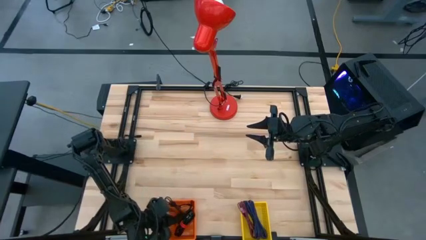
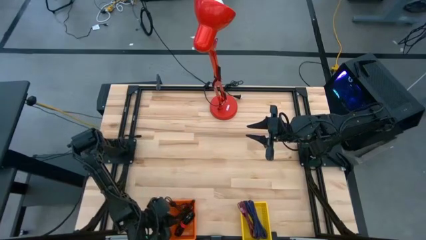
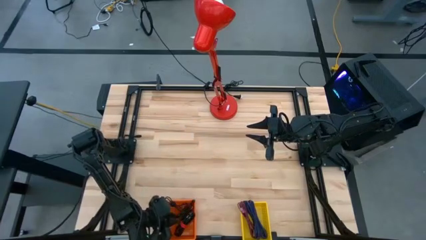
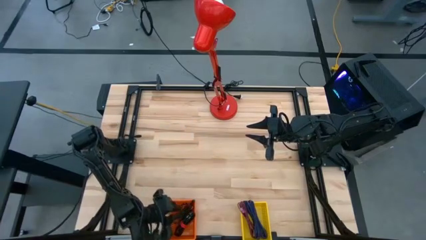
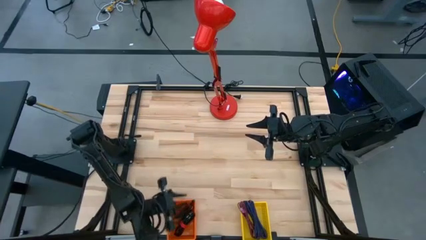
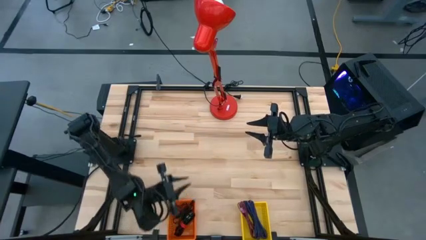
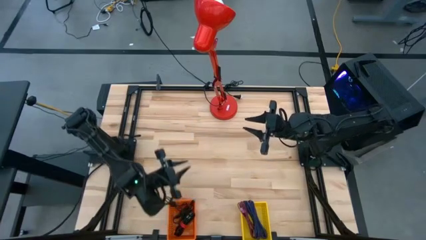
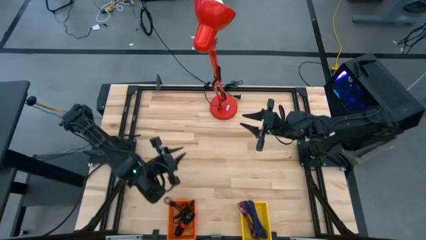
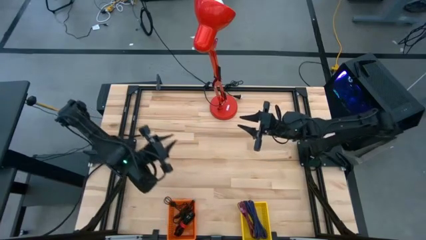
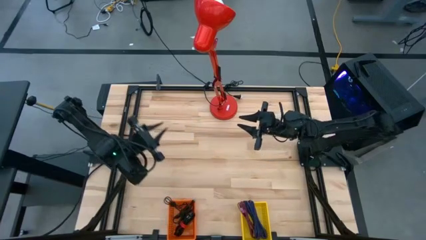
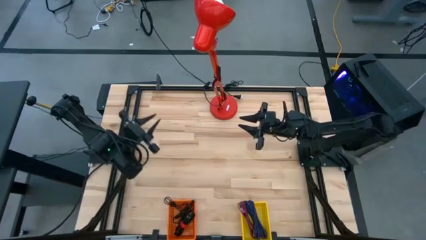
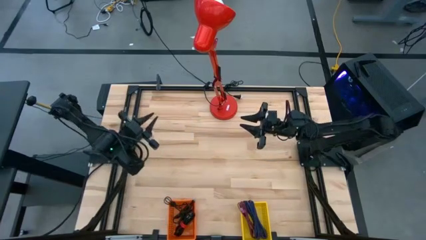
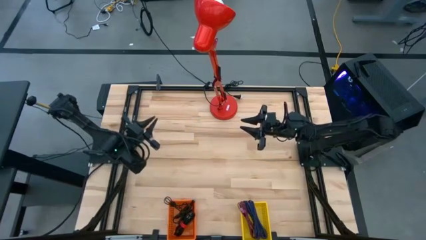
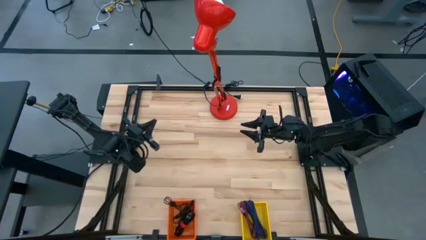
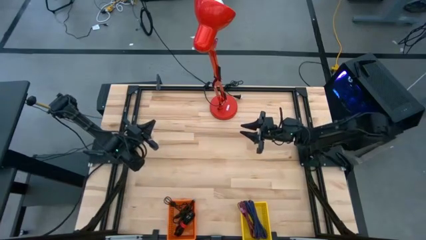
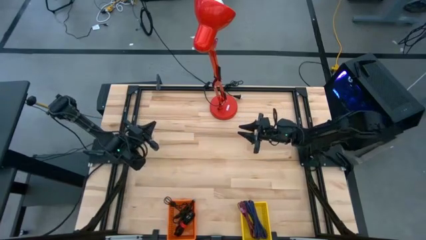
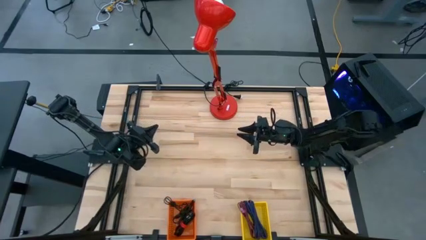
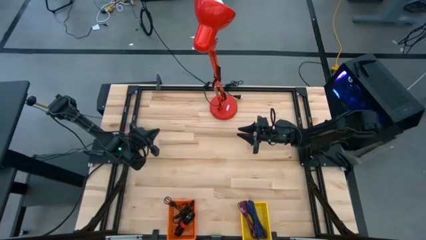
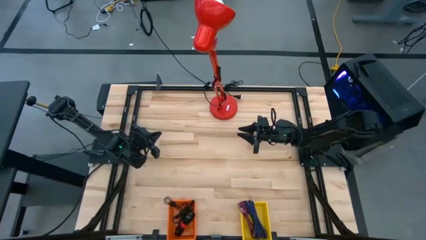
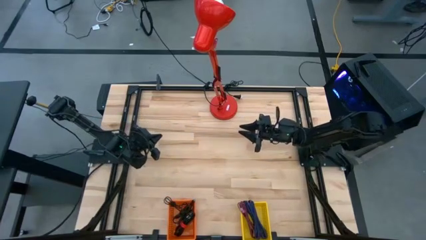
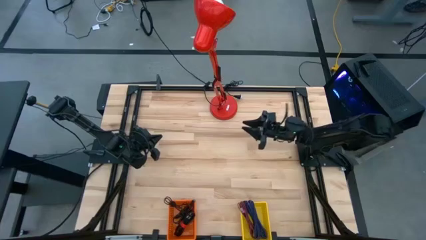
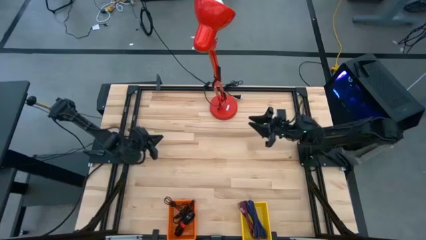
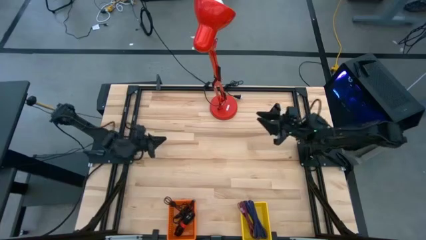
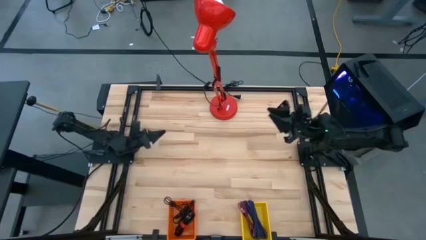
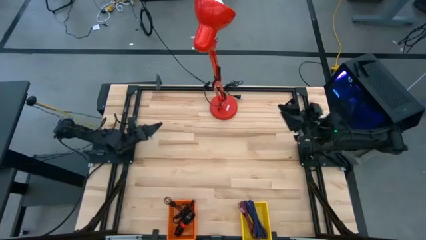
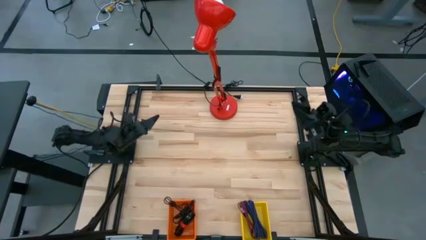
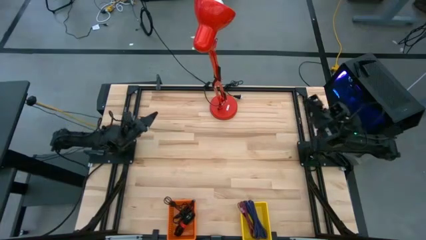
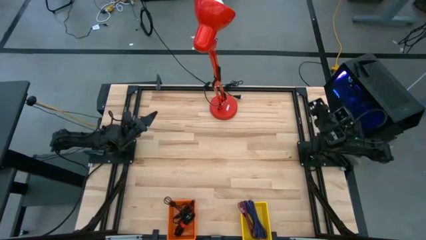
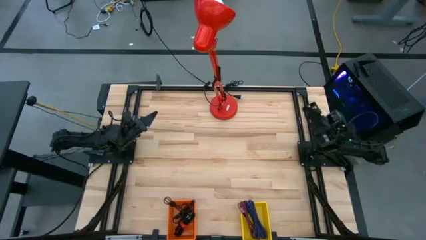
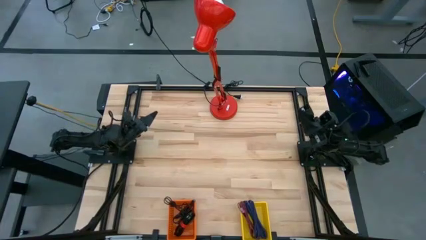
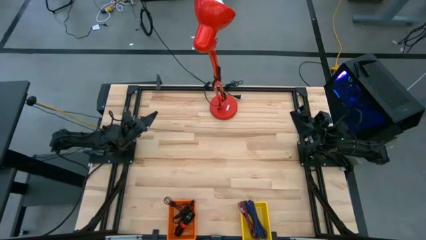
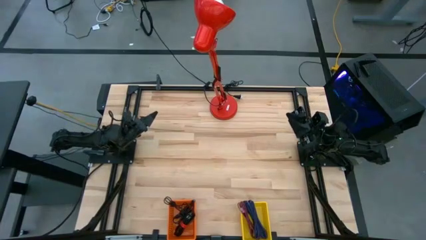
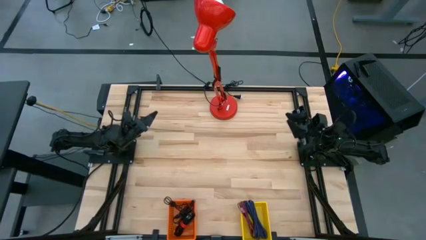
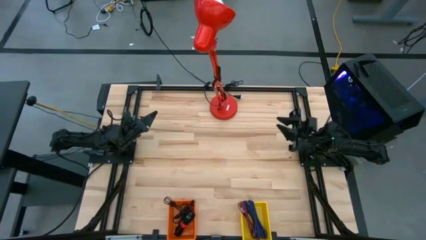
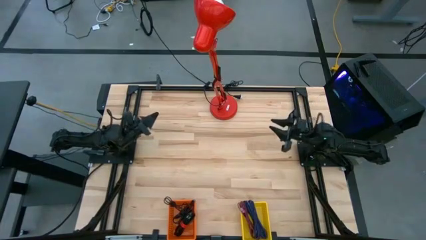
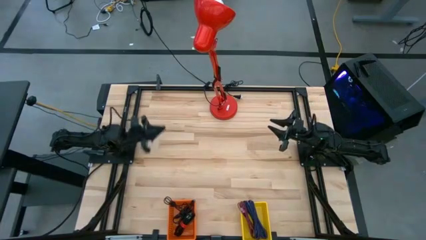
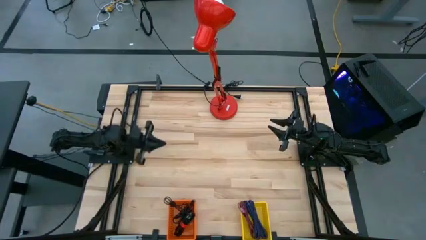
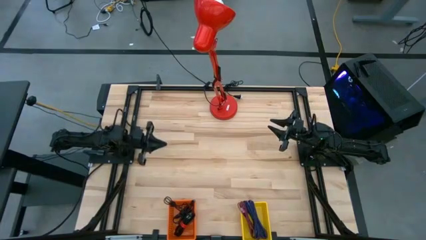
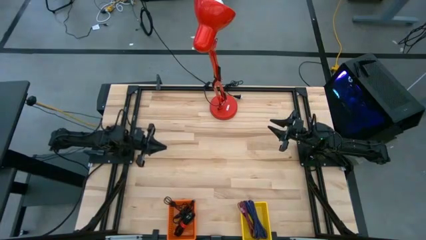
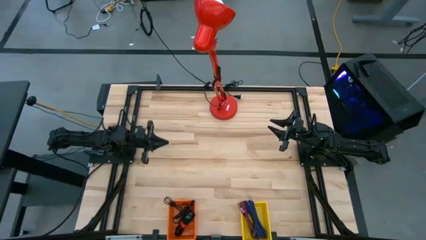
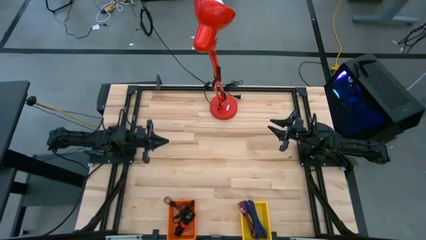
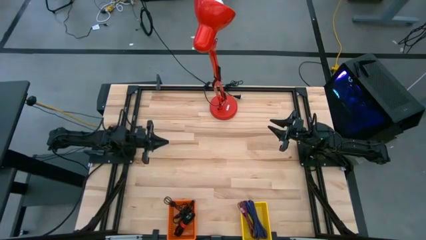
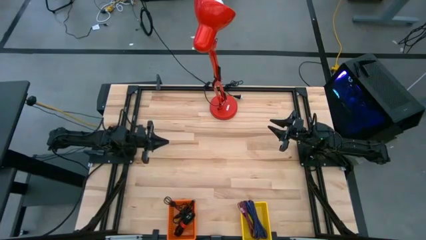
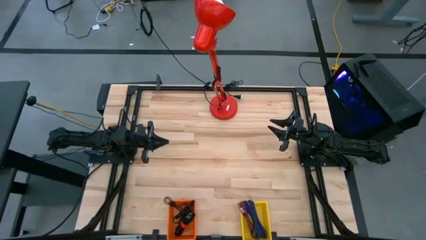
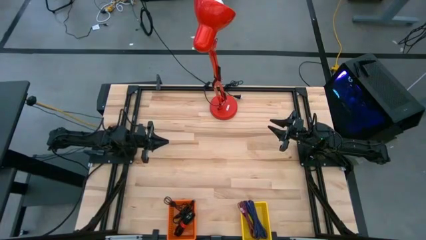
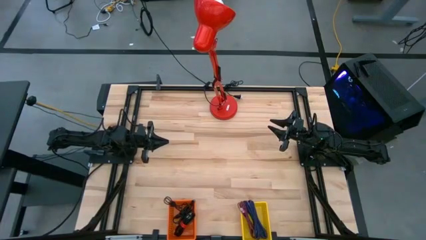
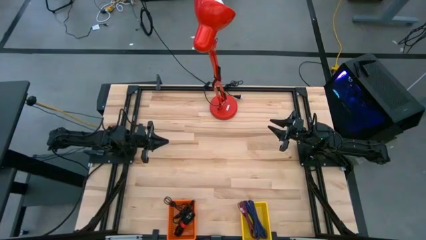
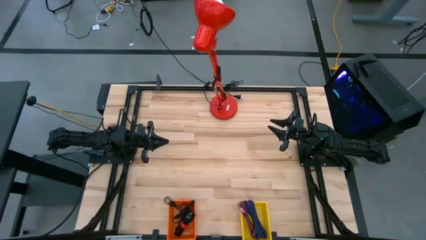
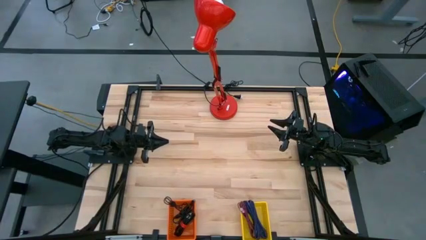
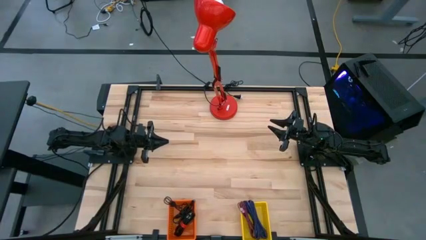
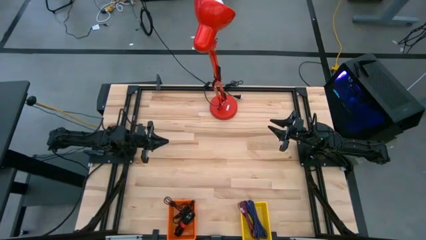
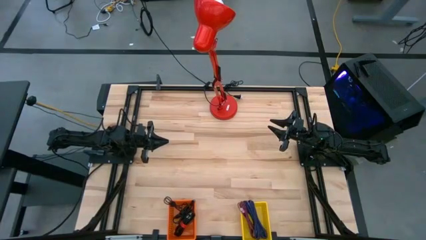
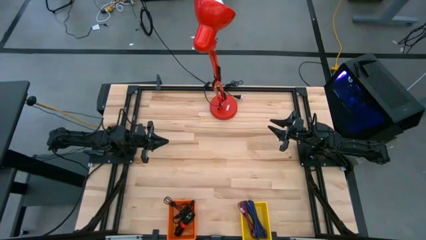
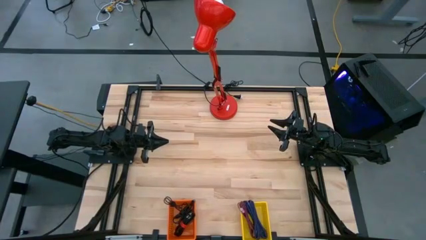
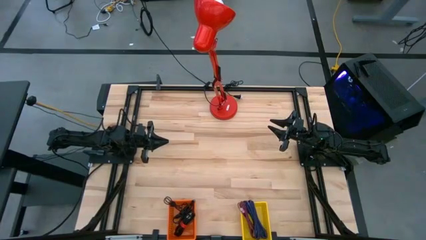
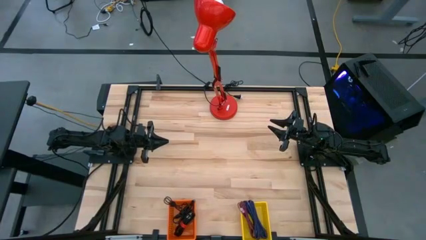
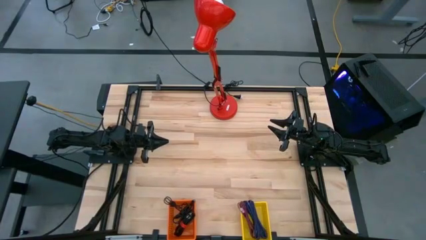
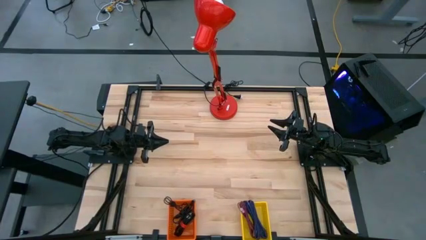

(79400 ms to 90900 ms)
Task: Pick & Place USB Port
Return to Home Position

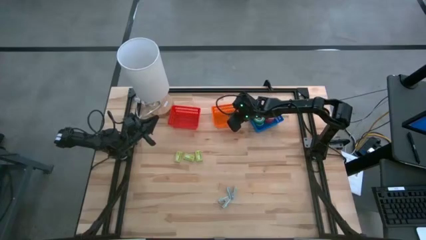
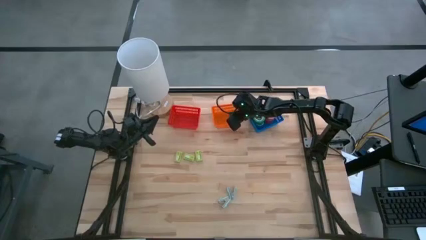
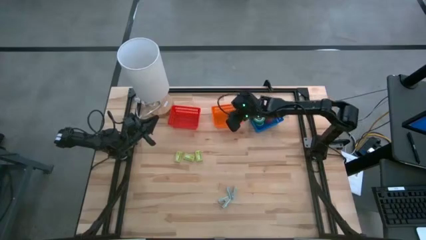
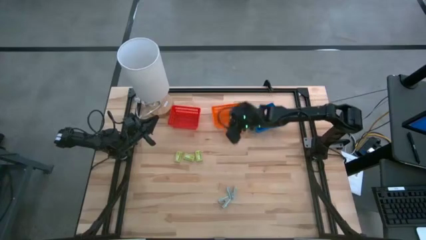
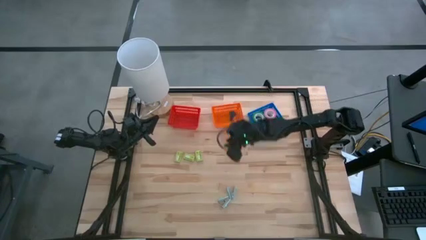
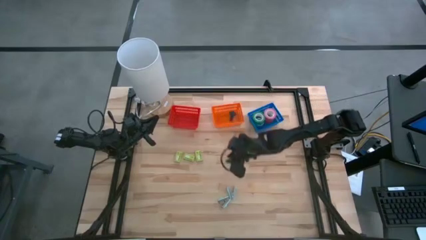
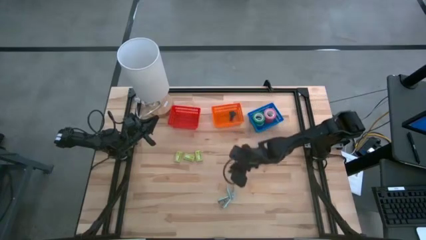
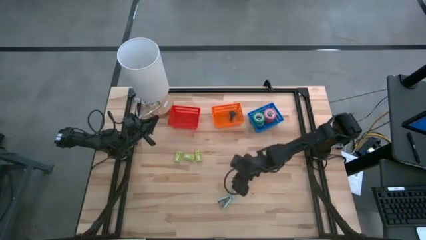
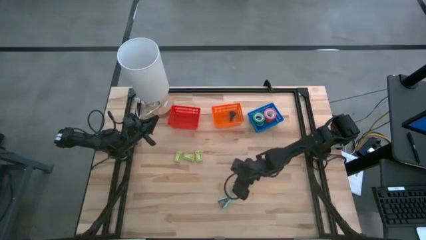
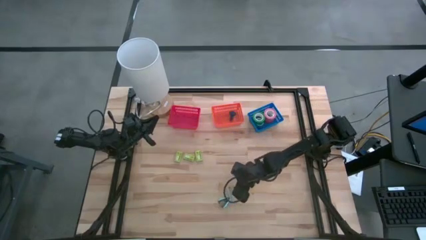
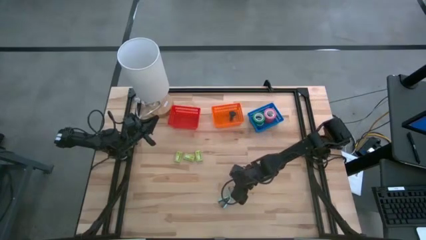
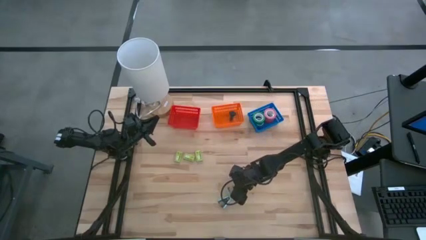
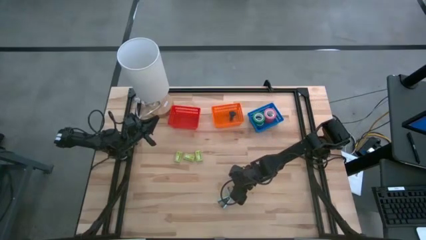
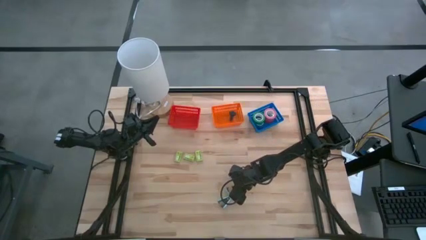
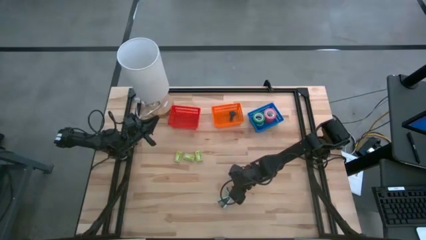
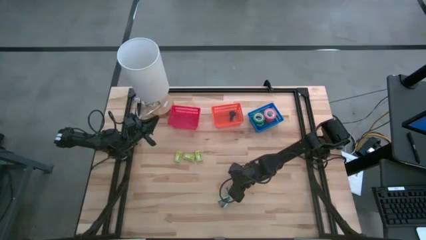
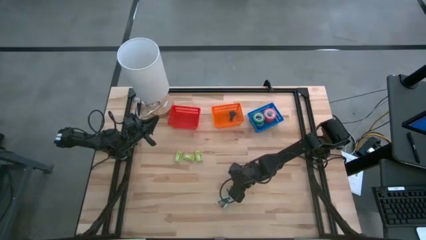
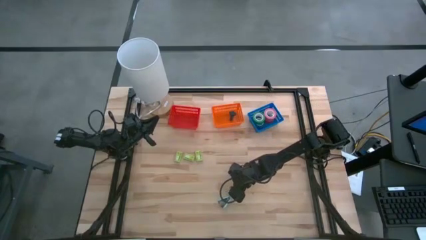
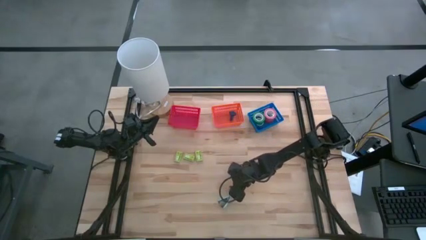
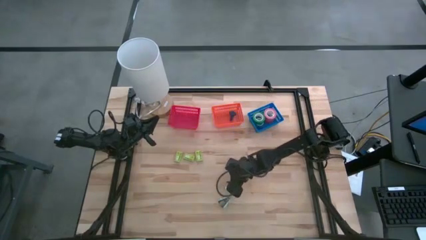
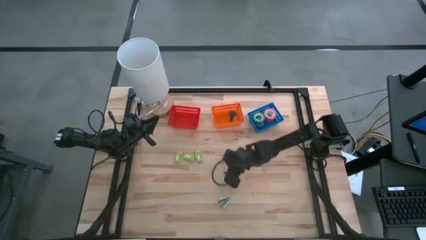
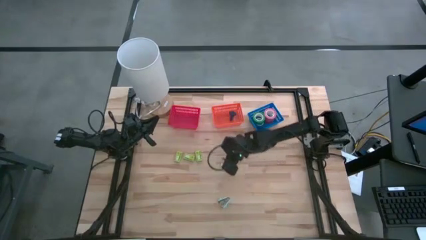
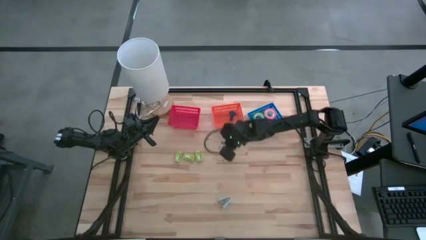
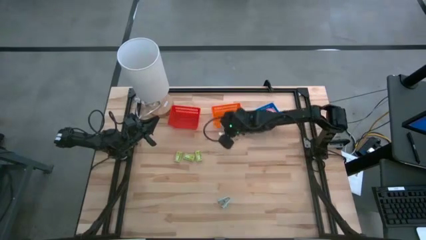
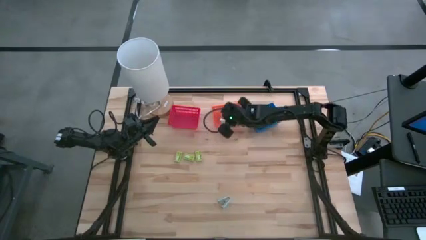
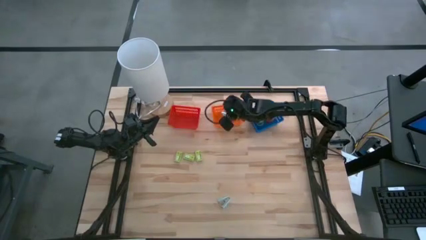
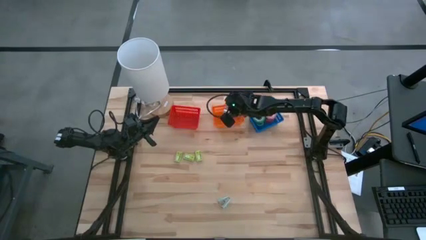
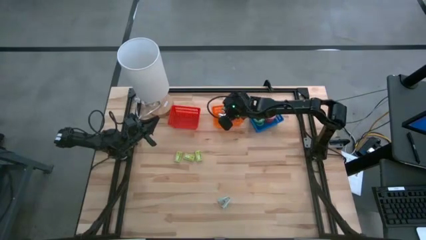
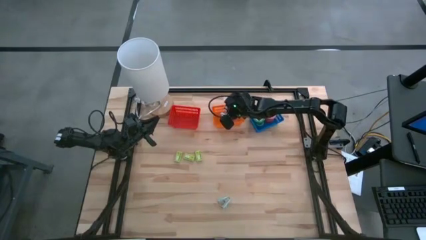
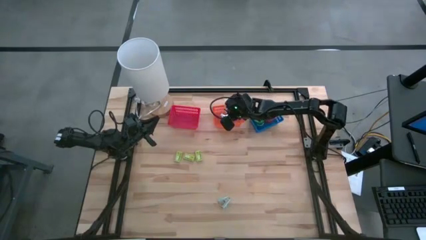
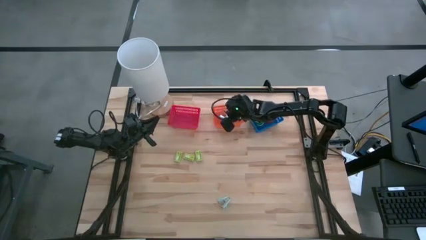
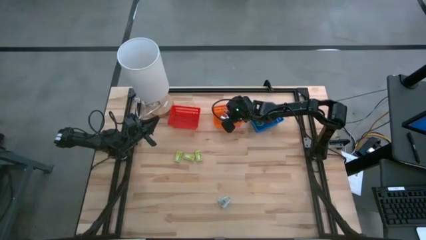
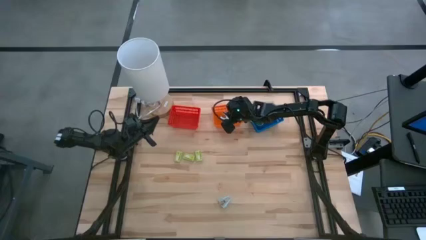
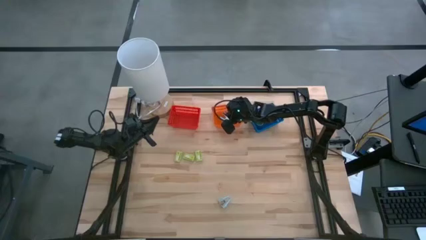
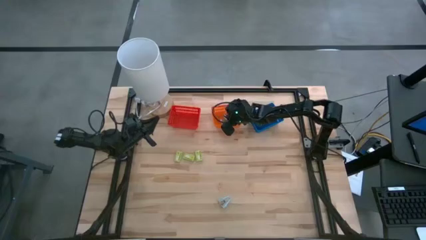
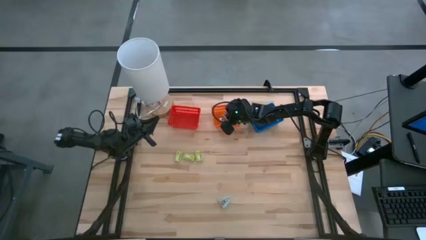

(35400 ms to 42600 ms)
Task: Pick and place Stapler, Stapler remover, tape
Put the top blue staple remover into the orange bin
